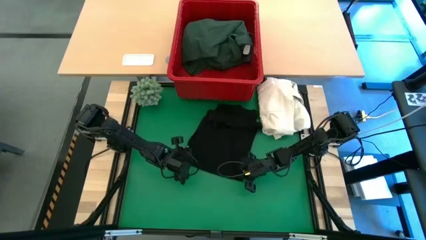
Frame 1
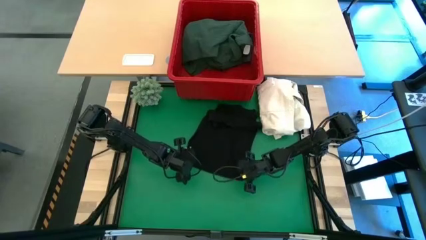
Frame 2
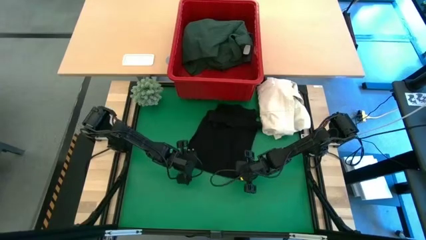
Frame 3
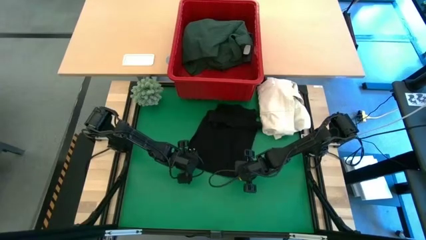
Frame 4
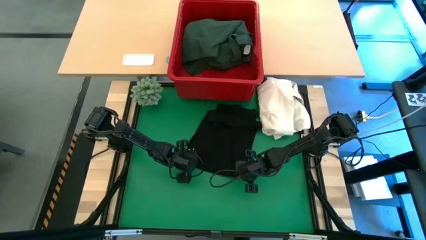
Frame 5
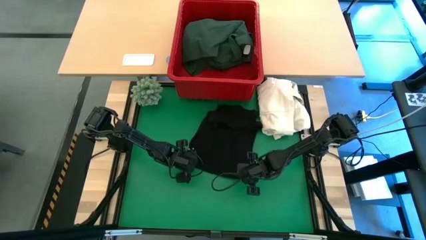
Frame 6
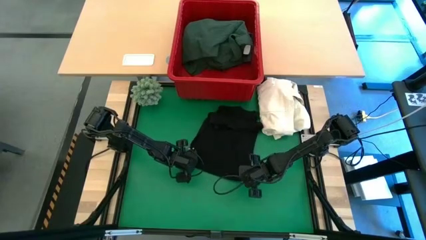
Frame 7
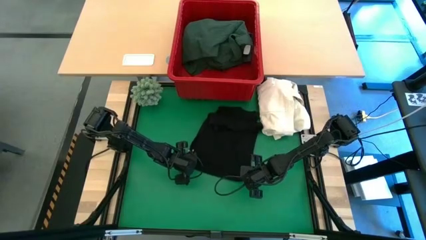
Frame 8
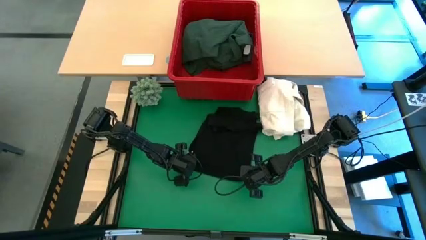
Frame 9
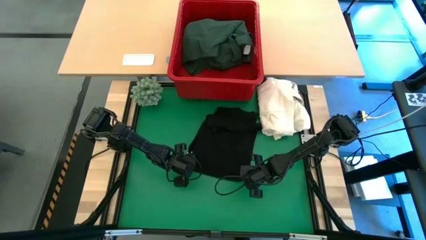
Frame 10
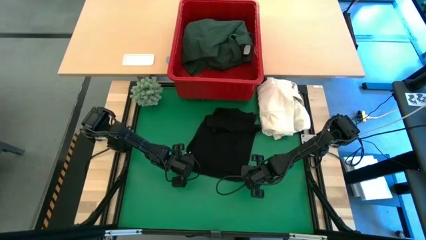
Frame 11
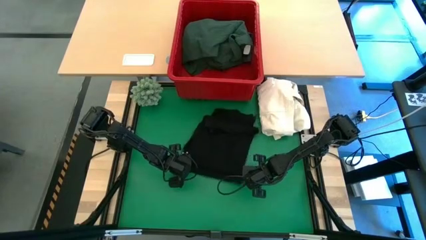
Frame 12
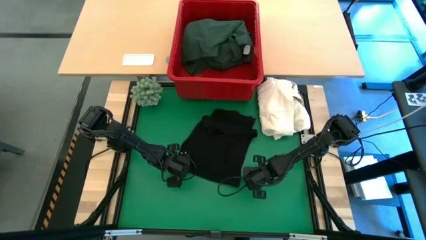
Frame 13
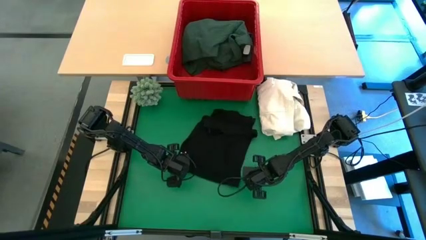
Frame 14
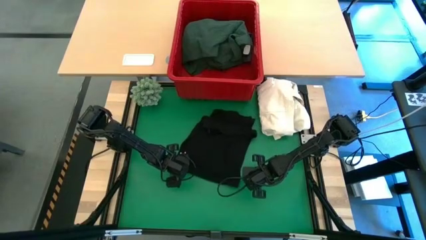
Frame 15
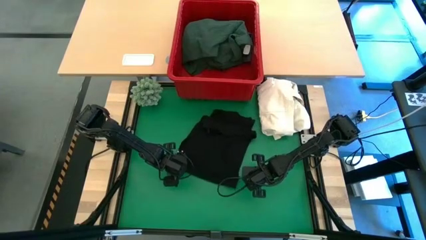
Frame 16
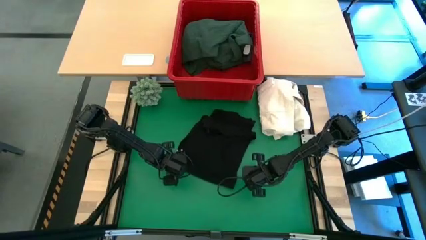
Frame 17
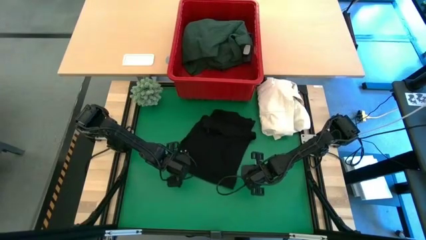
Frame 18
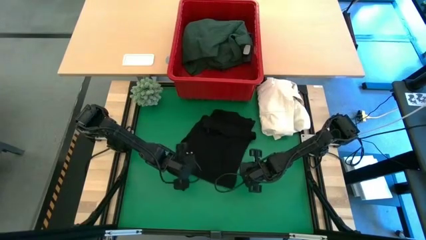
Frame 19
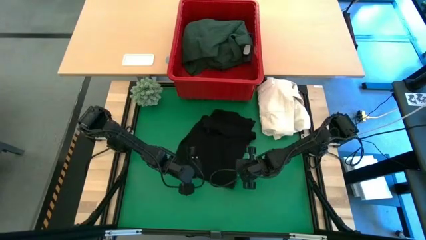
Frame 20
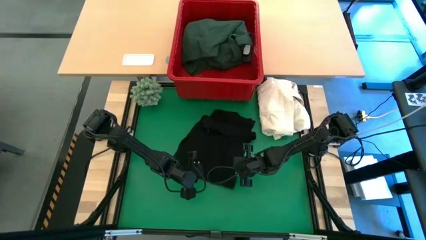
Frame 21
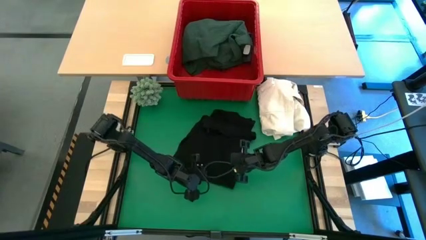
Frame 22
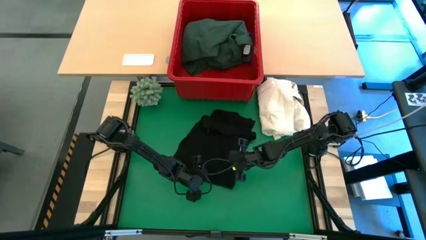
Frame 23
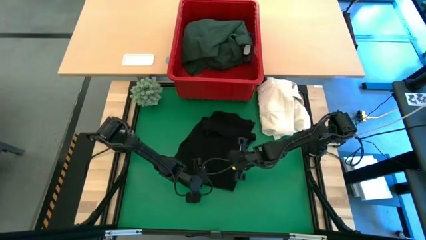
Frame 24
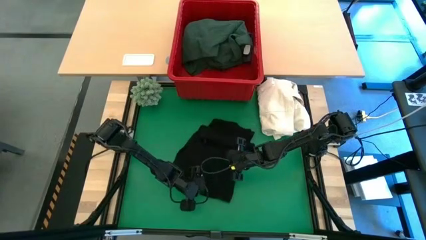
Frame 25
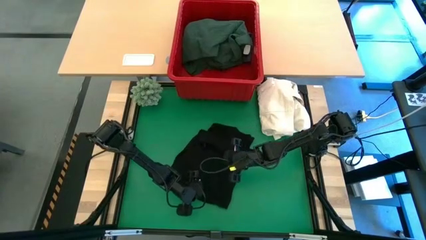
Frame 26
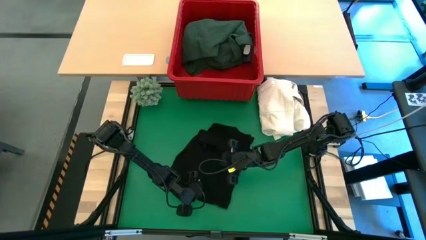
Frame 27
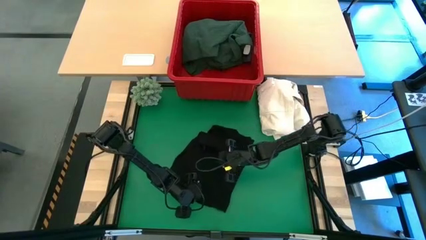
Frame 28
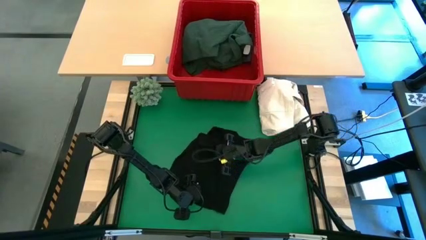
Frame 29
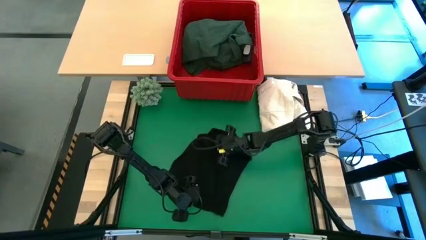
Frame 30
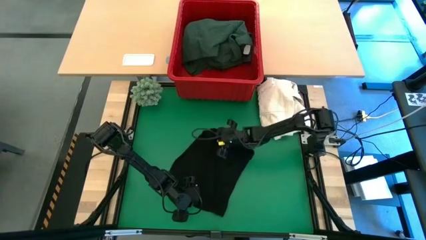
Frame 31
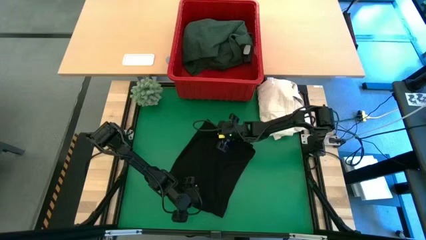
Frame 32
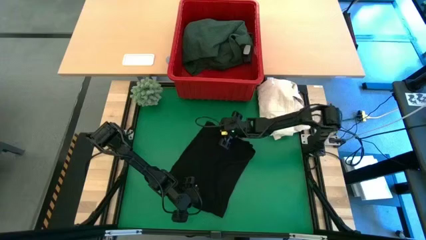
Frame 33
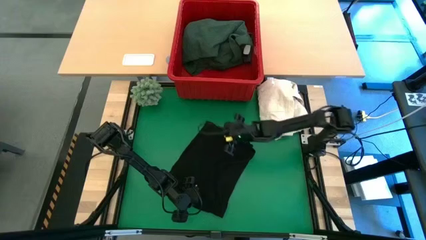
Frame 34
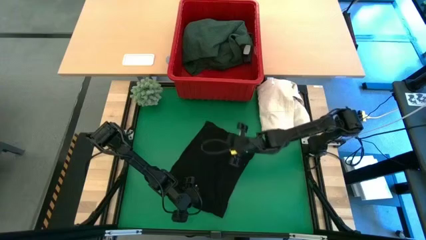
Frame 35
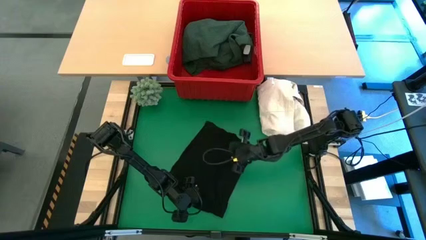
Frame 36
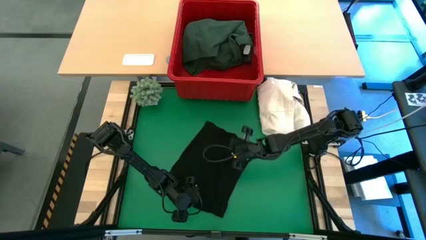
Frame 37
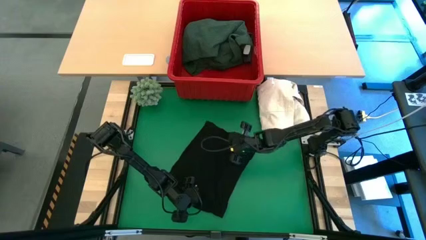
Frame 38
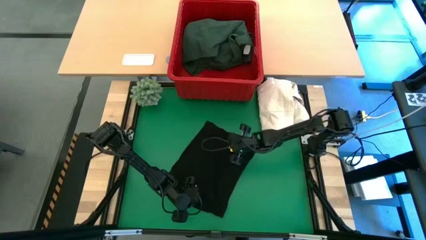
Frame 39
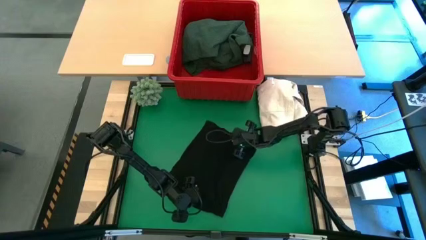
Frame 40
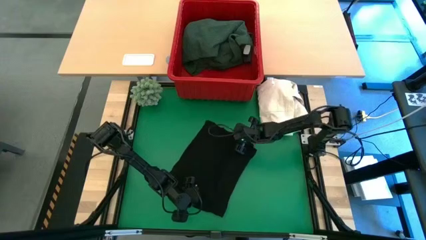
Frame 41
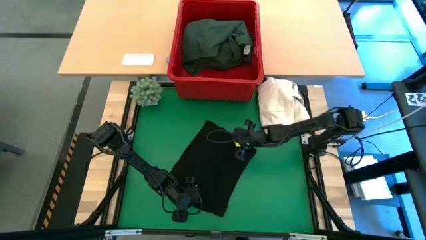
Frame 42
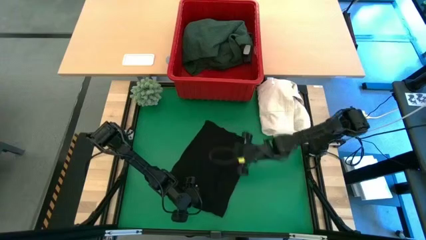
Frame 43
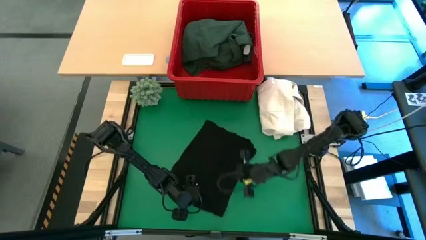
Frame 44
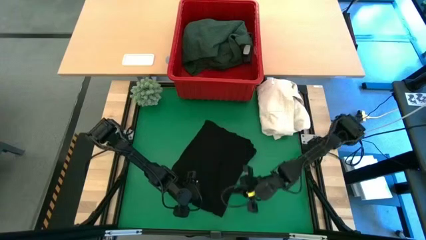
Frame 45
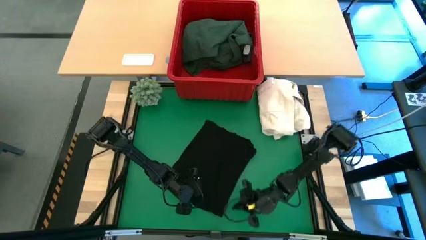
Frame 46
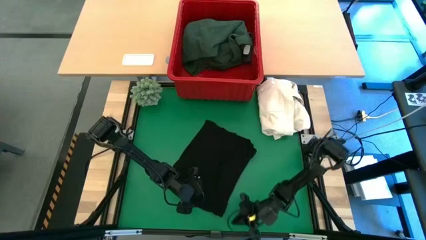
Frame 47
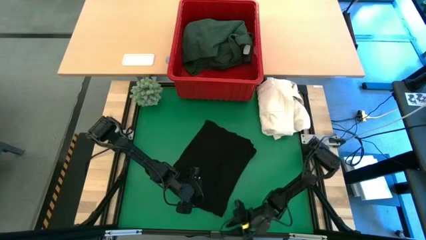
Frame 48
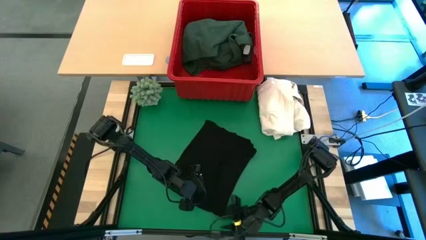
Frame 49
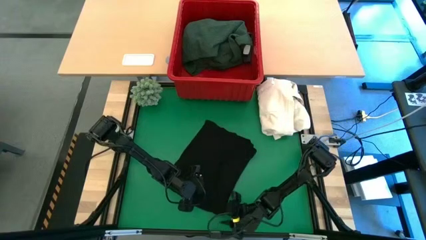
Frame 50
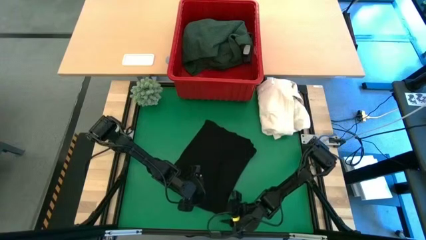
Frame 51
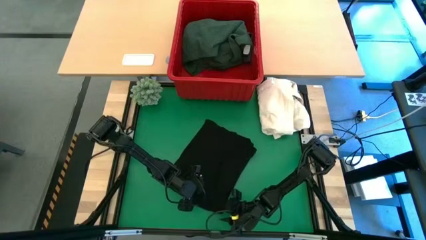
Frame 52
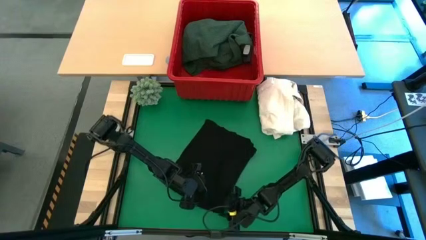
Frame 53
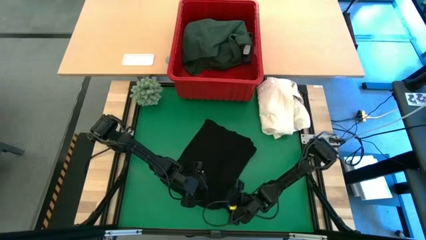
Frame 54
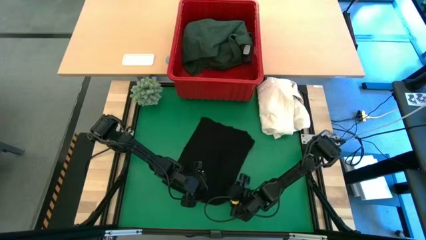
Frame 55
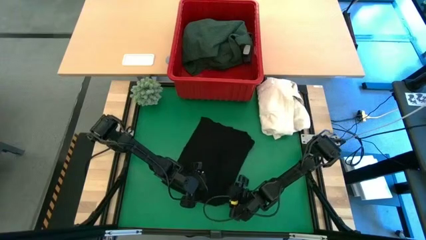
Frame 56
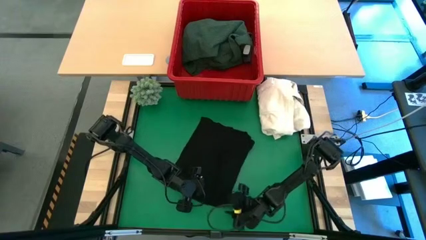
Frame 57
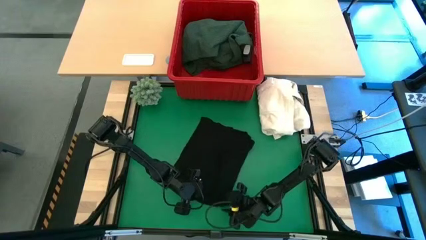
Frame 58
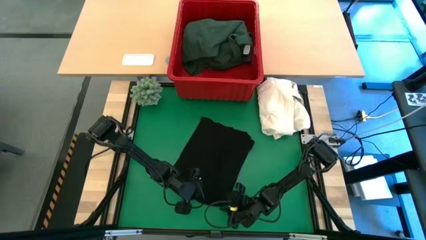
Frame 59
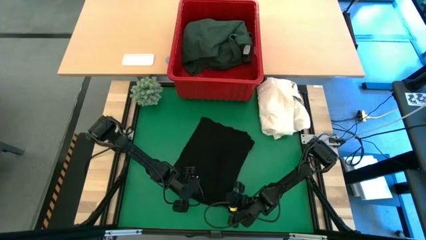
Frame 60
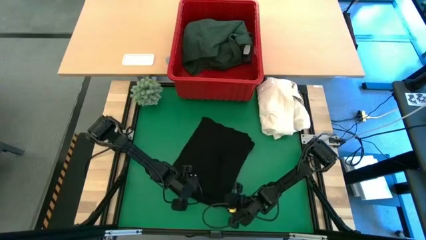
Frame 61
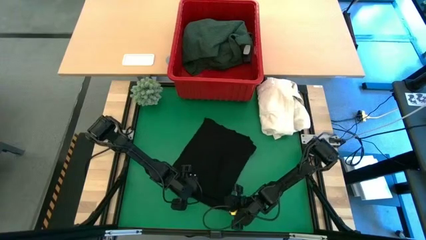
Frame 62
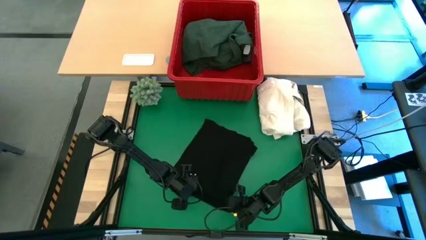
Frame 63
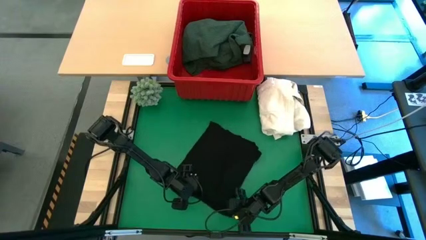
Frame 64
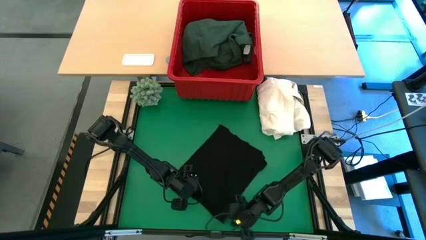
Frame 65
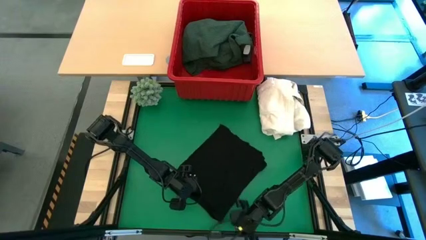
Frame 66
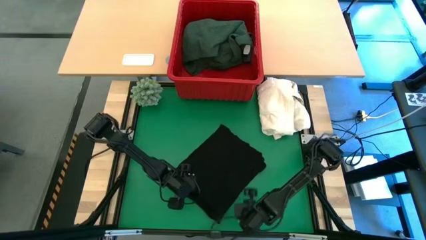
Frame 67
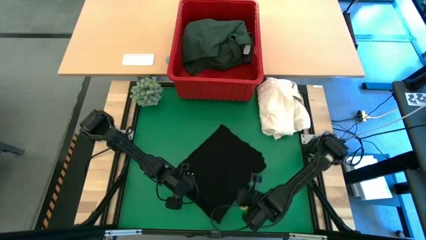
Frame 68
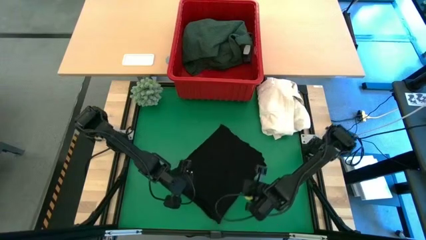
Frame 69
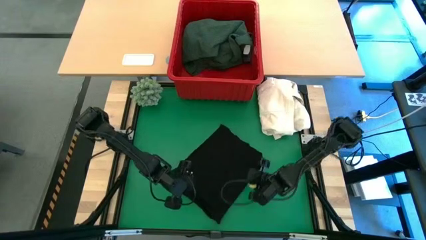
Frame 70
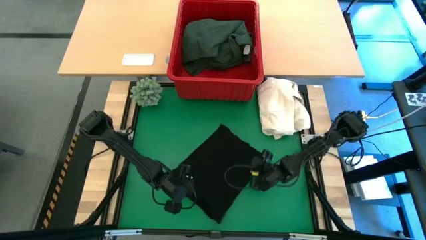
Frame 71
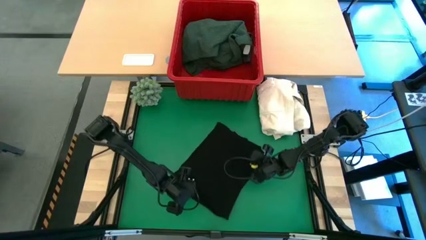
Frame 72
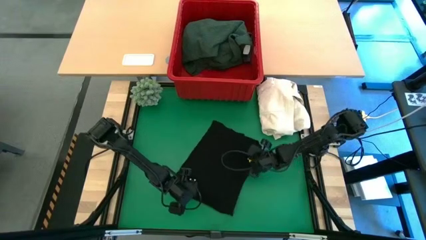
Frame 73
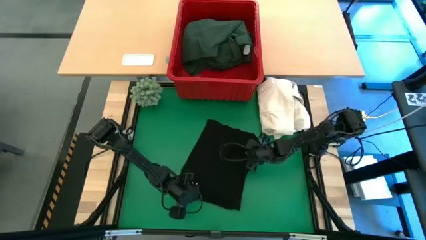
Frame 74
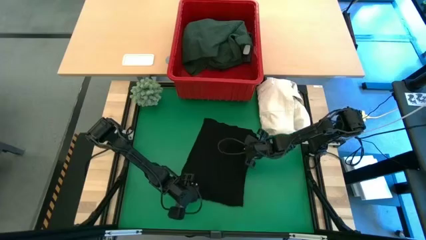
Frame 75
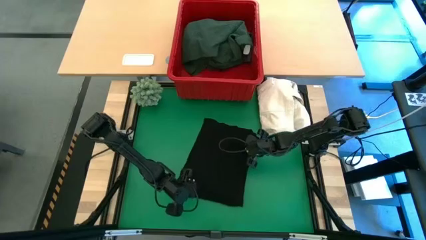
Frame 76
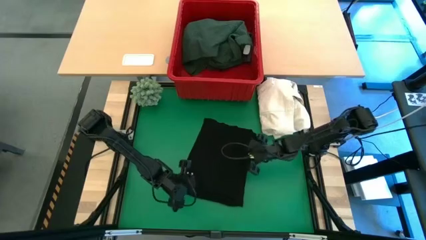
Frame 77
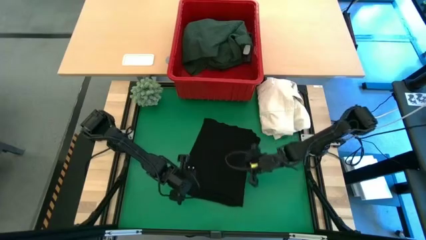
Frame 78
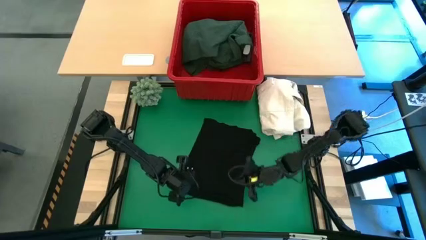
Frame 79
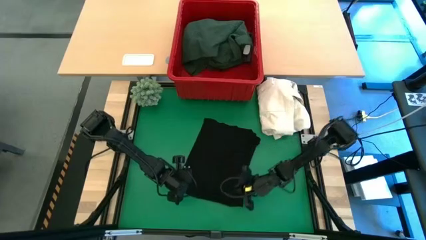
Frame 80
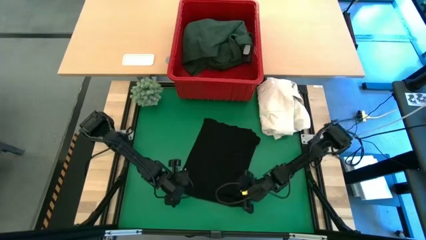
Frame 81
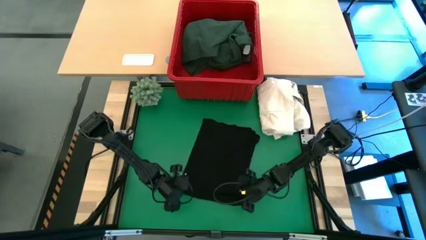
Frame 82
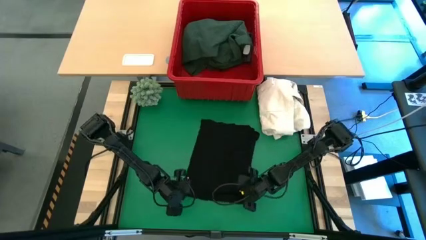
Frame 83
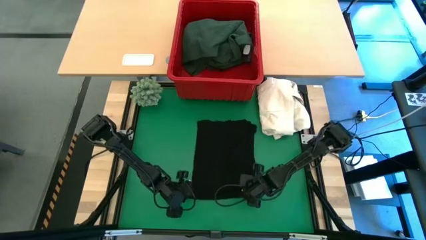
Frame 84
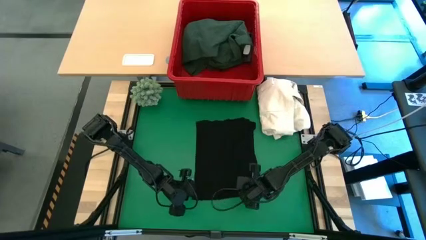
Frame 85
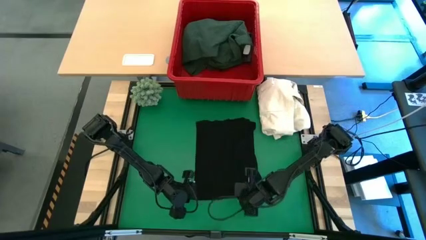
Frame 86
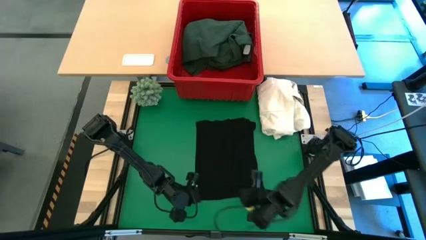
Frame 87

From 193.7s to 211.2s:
Task: Fold laundry
Fold the black shirt
